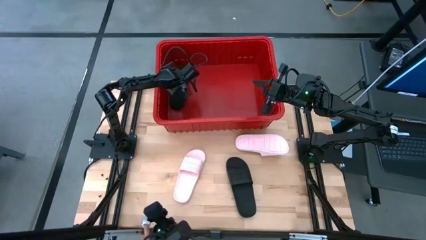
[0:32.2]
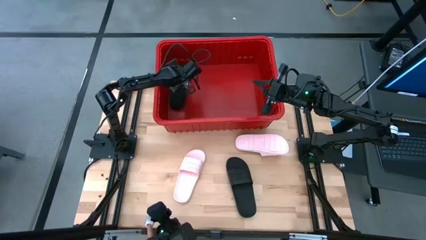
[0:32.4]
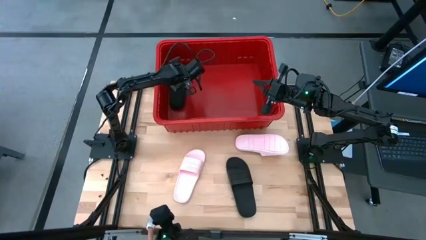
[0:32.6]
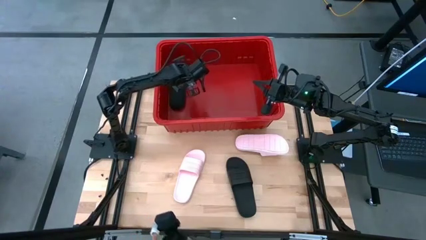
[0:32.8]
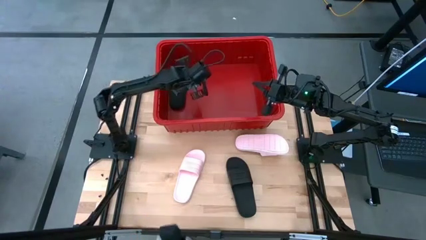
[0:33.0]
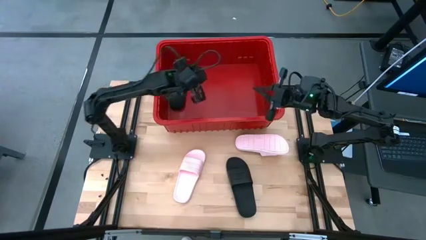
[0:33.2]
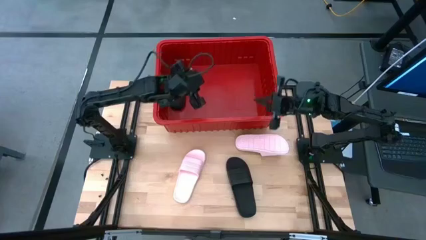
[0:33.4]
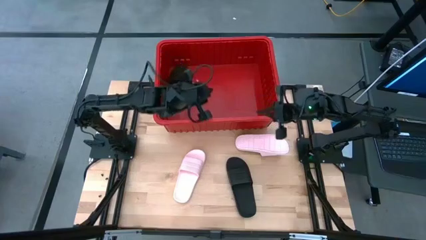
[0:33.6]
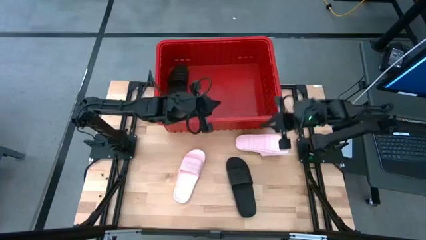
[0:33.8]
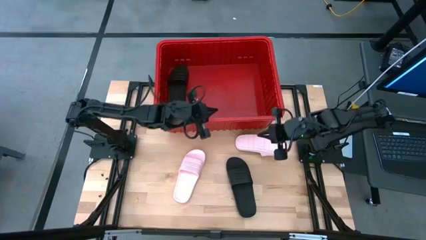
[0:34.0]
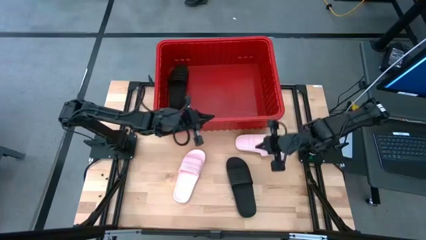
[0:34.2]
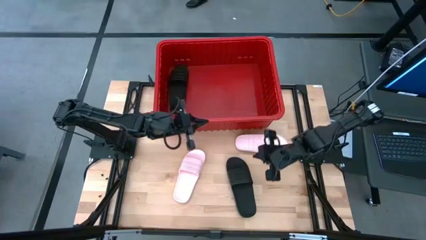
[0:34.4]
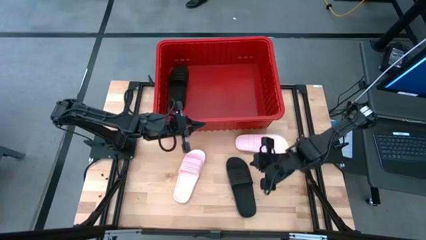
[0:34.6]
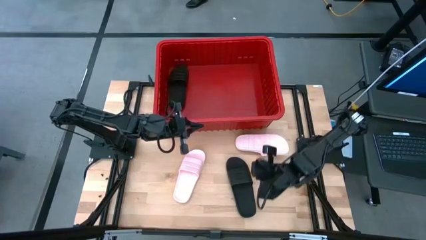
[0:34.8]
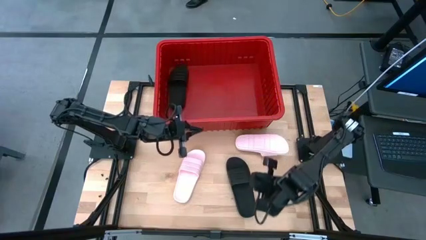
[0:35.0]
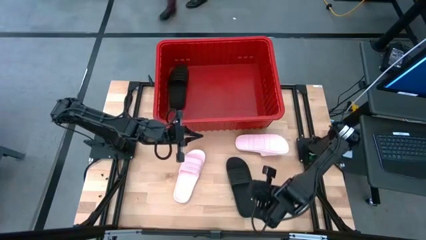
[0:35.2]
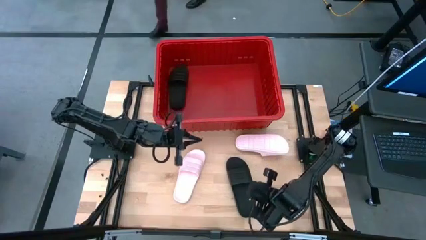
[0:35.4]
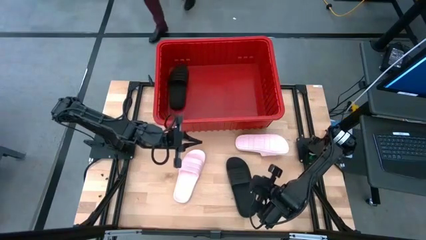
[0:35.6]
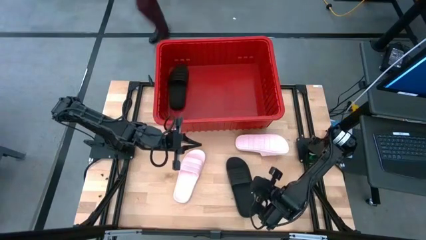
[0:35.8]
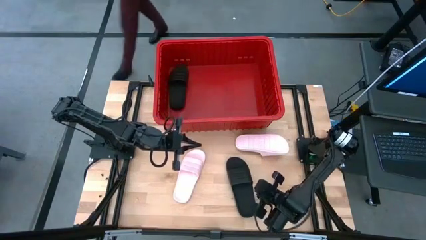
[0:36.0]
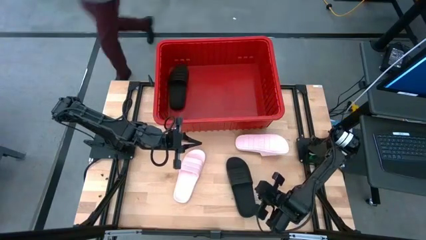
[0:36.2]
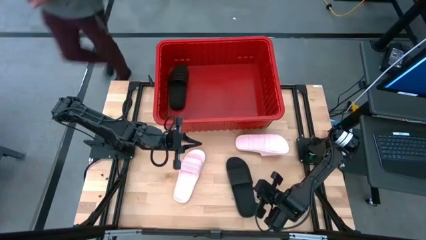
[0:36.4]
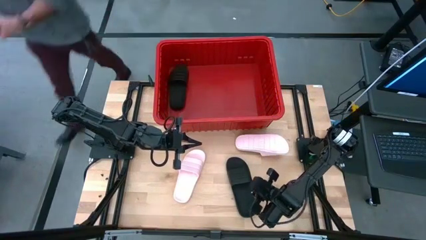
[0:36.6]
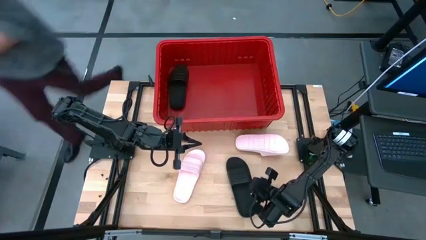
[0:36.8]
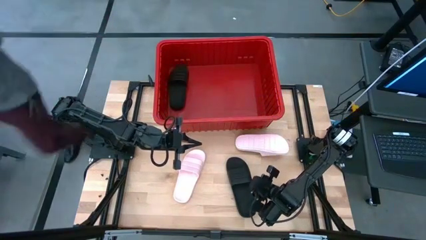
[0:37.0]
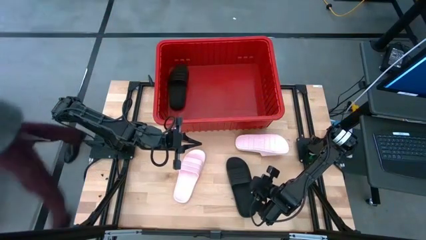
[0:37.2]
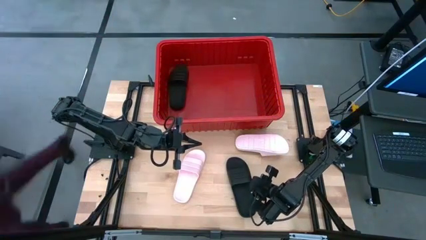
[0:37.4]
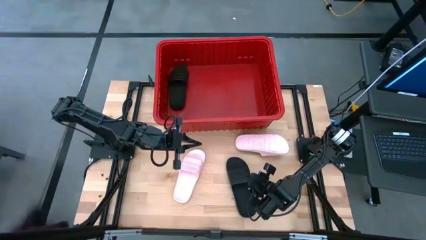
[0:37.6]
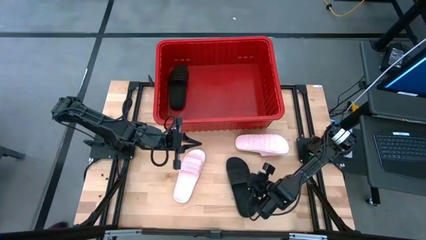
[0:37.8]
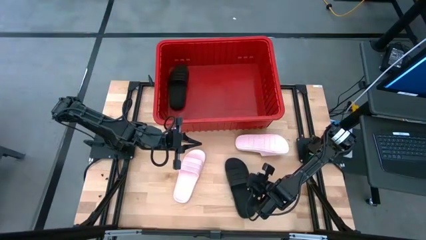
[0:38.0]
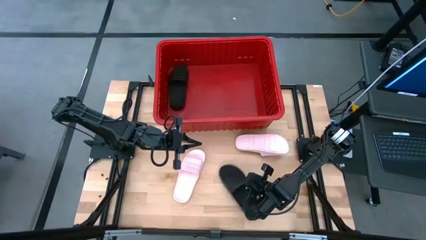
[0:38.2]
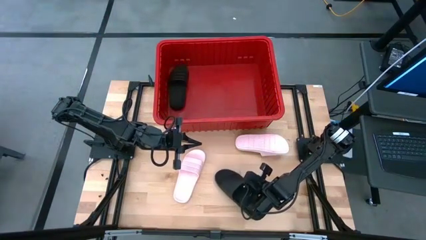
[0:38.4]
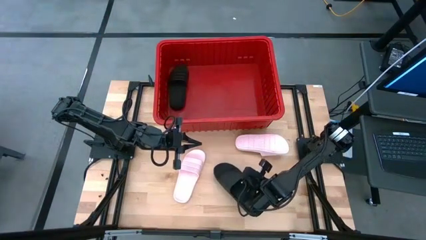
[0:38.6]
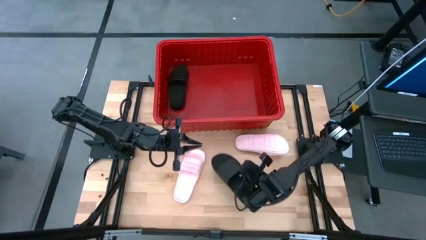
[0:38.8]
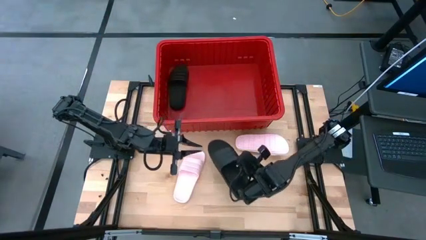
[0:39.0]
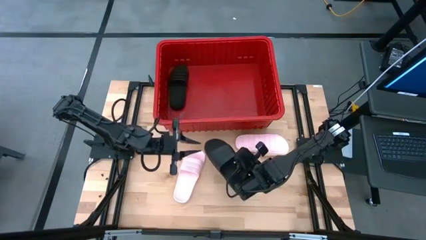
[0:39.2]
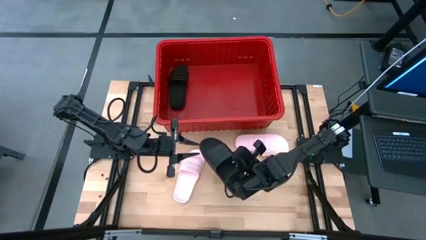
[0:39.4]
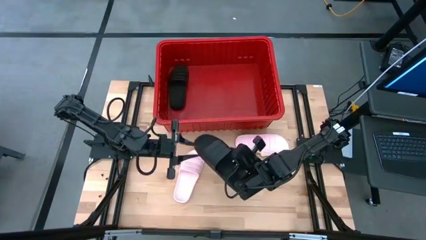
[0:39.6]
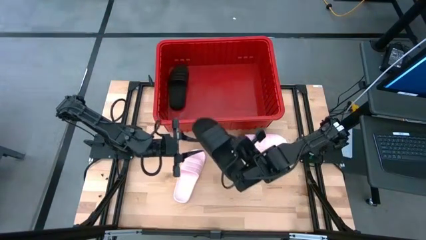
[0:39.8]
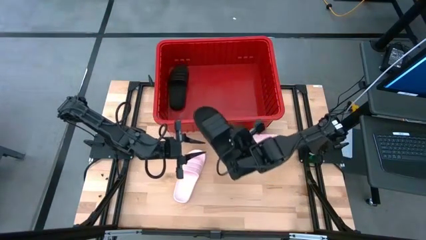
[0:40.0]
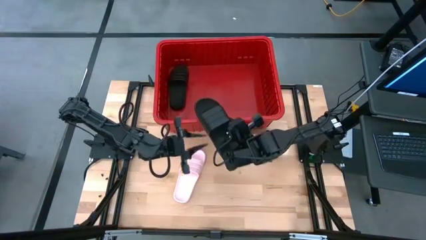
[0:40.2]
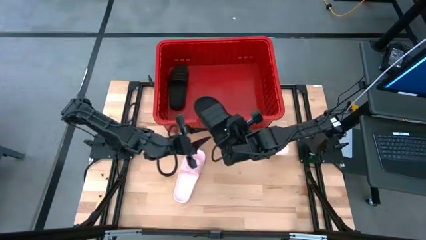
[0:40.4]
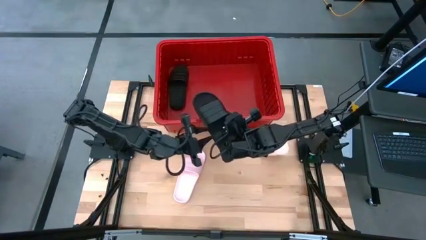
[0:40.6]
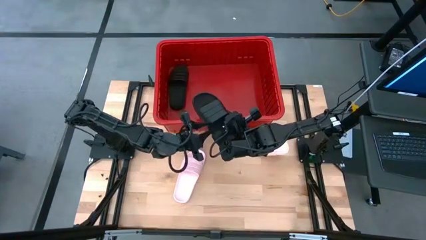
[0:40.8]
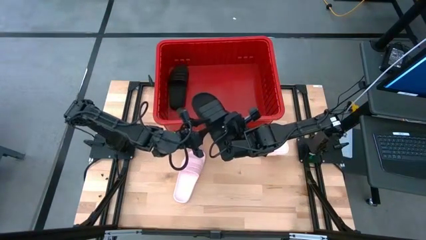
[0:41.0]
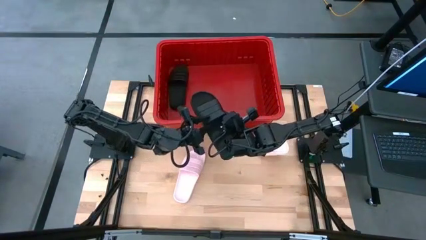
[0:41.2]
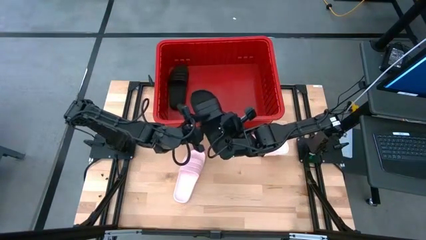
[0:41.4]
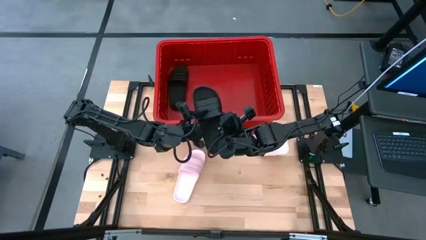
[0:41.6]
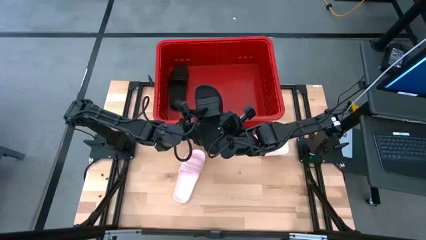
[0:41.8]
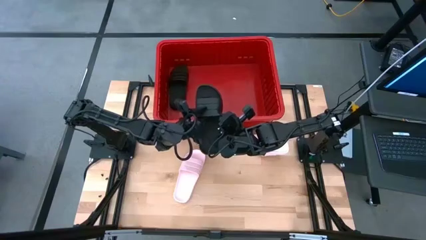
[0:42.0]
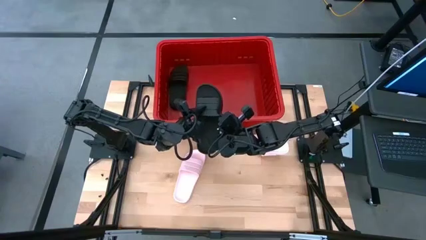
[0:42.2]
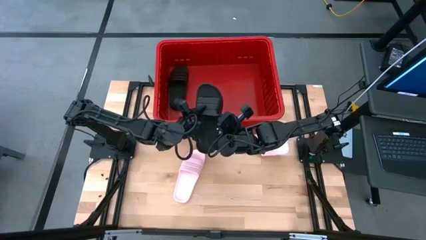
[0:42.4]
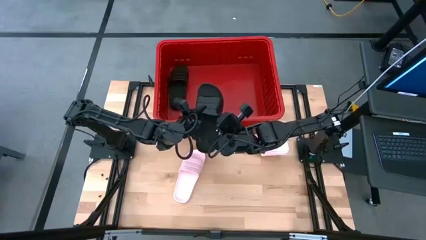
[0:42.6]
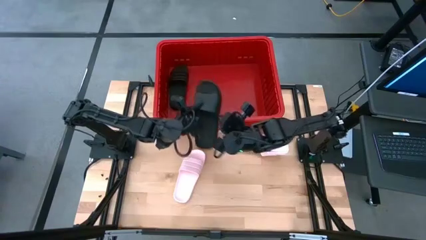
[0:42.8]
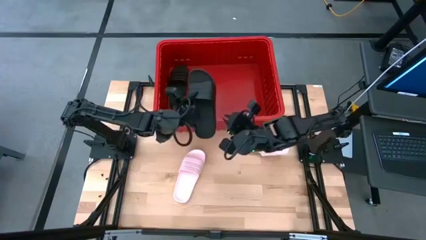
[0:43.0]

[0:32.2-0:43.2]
Task: Pick and place slides into bin
Put the black slipper into the red bin

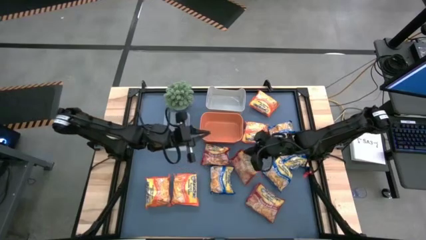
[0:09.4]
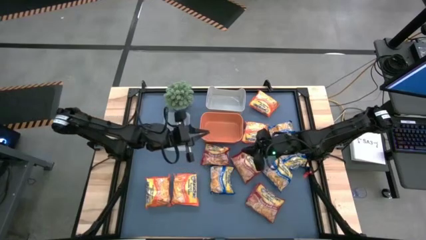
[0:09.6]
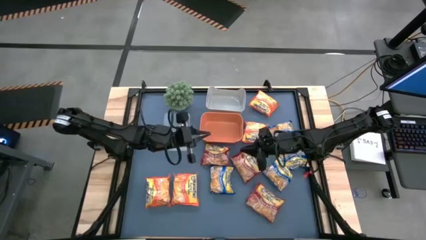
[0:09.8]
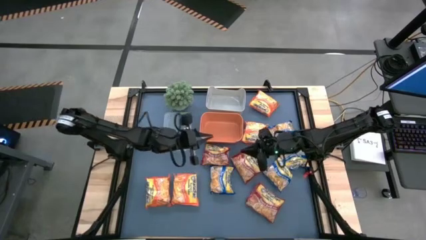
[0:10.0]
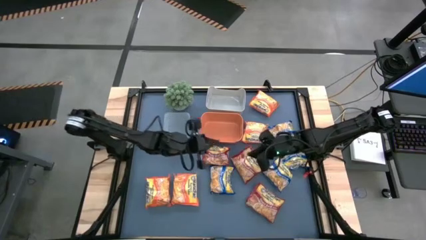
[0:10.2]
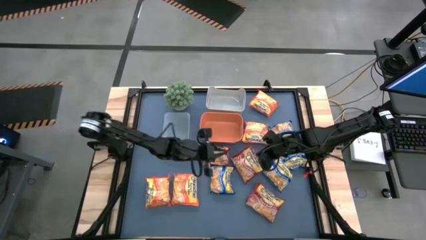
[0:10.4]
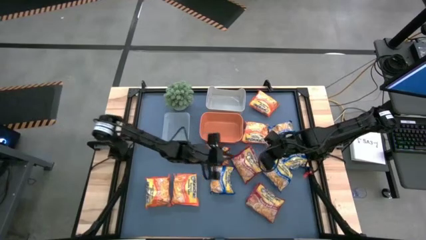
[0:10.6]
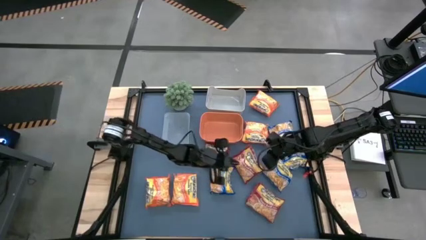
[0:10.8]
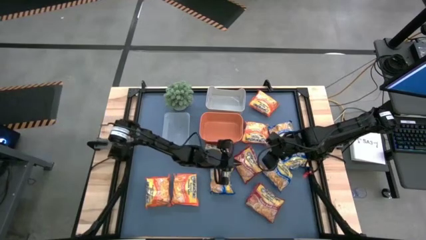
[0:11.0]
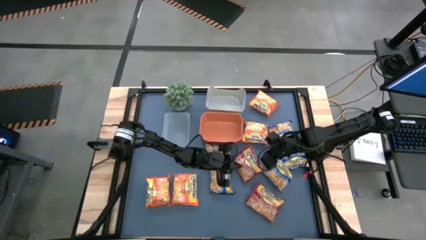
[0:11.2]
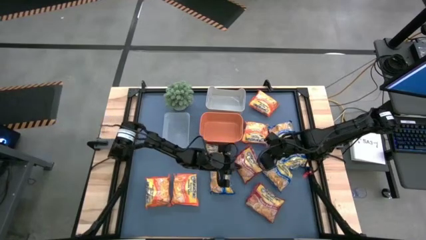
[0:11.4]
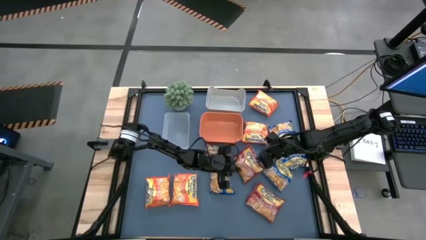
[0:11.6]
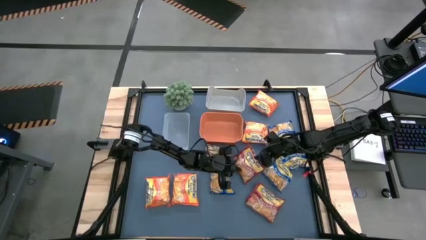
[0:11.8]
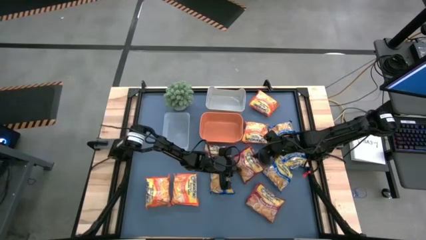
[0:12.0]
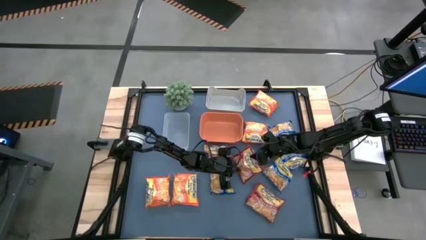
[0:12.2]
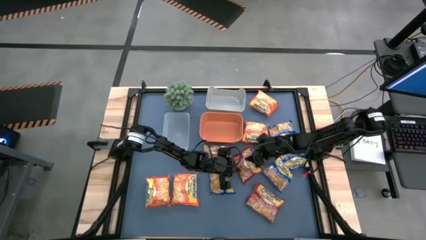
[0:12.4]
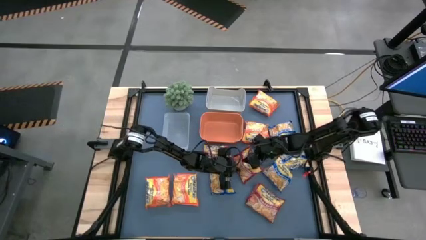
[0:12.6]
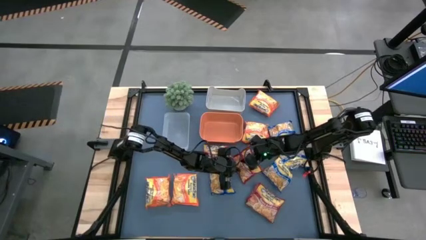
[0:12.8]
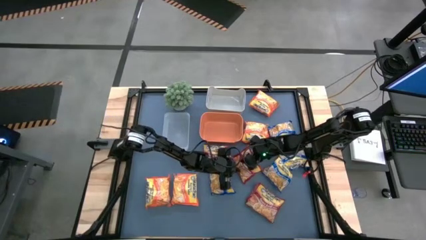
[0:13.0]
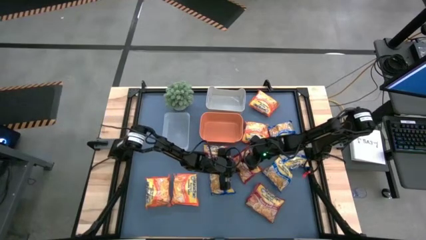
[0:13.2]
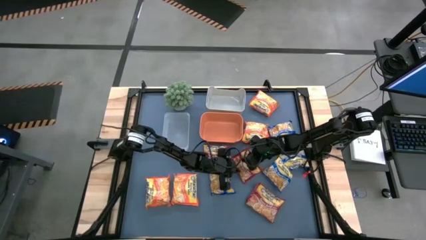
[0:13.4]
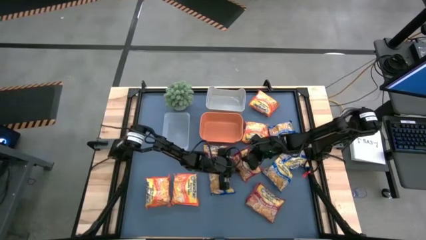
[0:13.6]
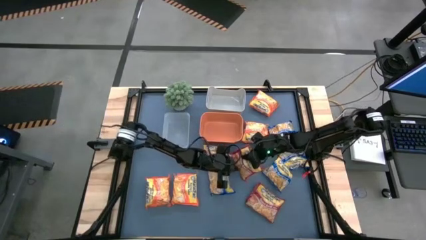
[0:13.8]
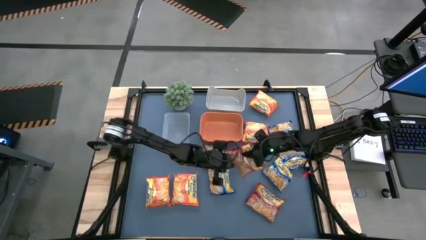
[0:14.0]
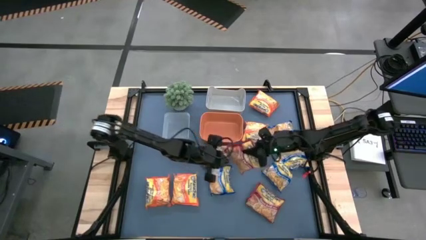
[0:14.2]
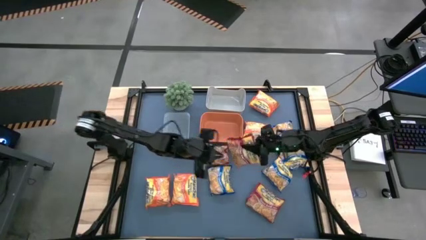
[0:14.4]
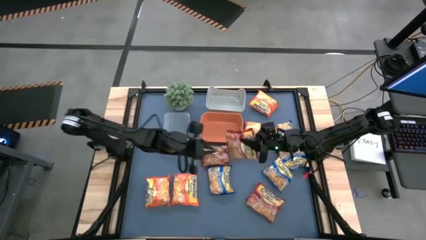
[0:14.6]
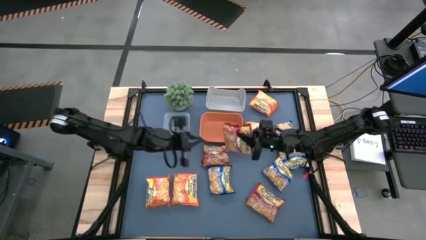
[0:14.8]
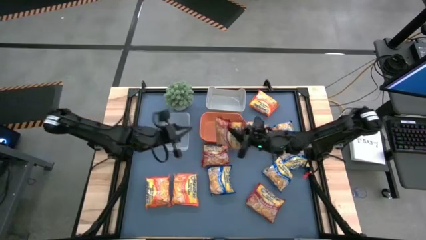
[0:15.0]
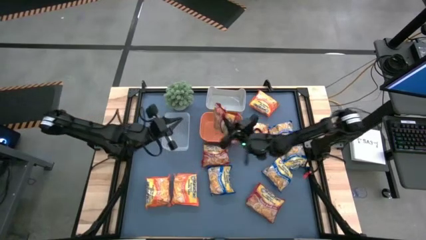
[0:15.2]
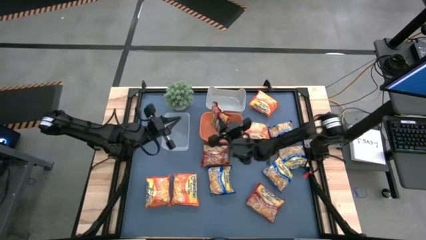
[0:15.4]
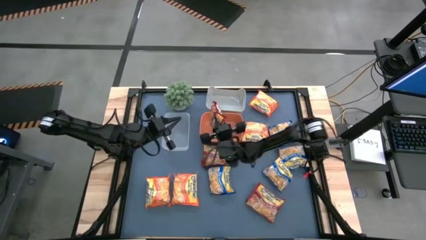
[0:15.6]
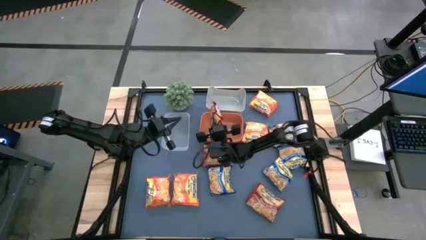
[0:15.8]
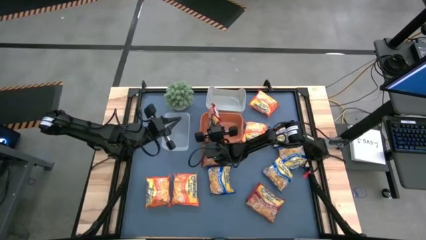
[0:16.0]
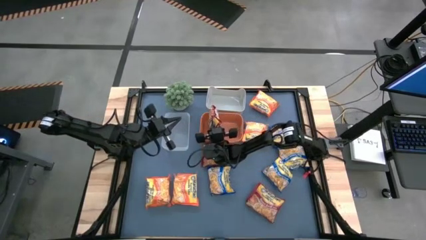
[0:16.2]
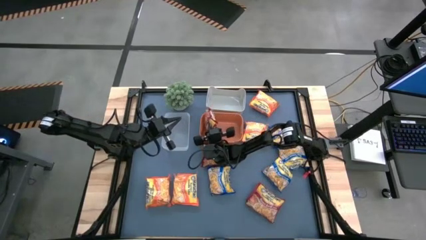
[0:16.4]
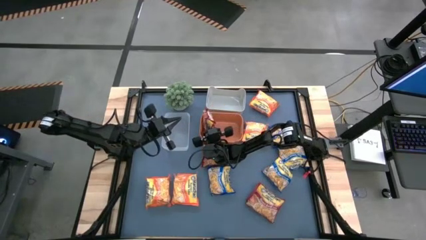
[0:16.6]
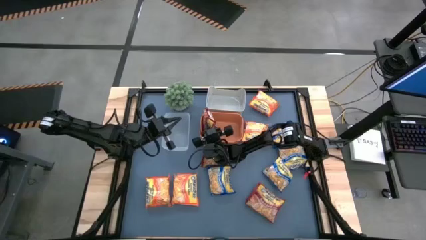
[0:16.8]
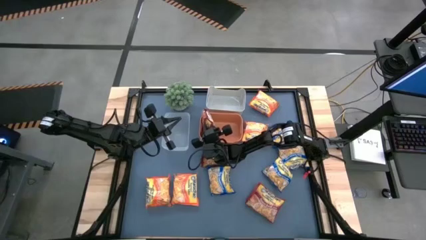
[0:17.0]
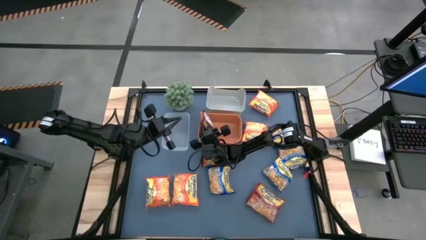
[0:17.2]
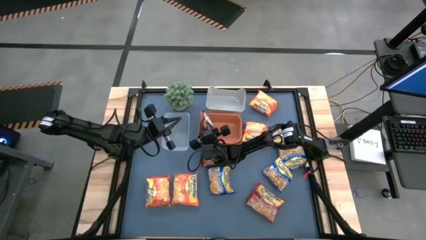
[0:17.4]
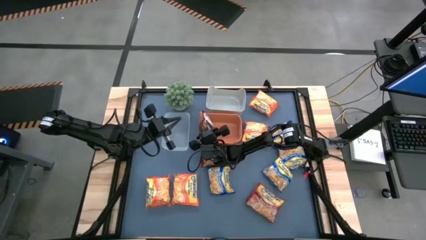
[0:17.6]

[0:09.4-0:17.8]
Task: Sort Maruchan noodles
Put the middle right red noodle pack into the orange bin
